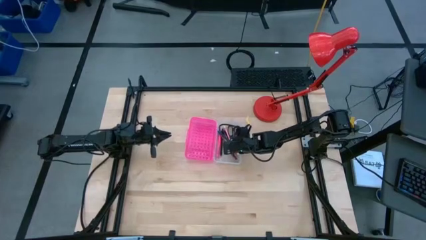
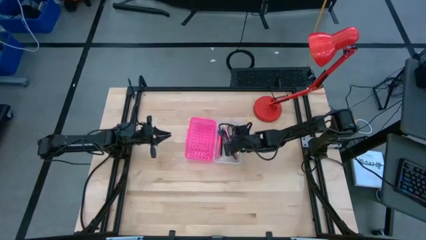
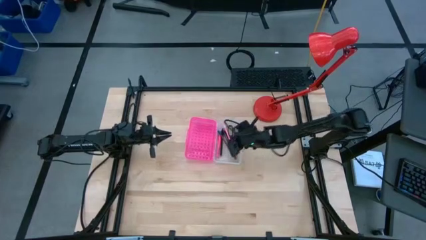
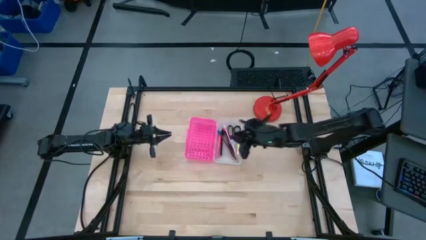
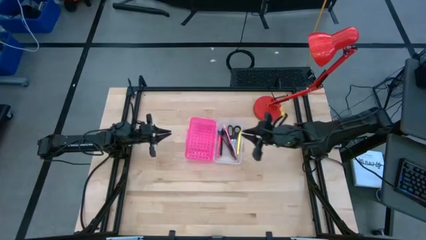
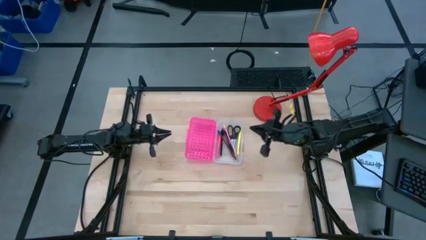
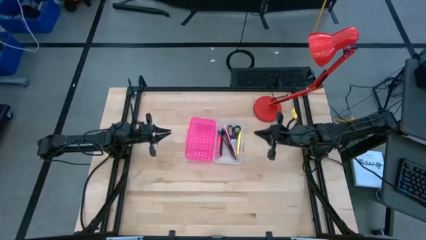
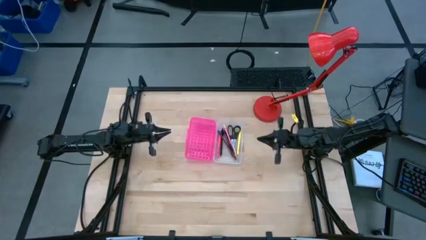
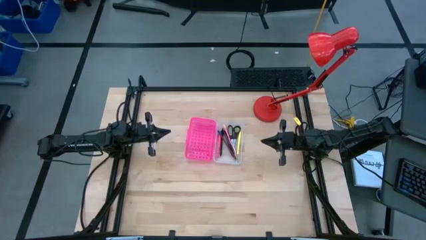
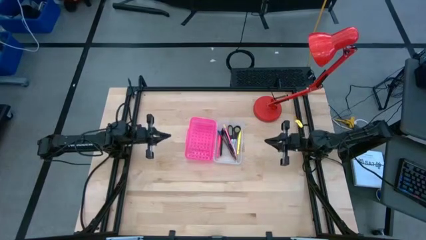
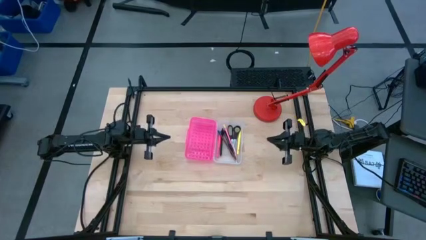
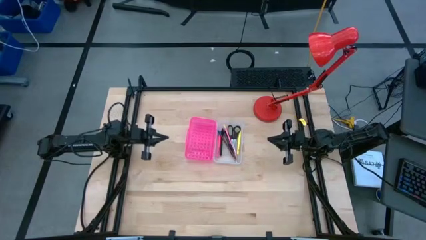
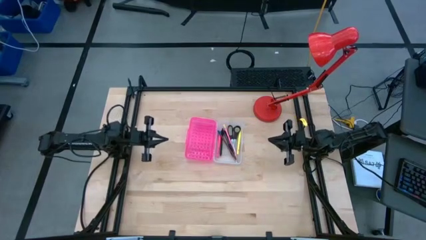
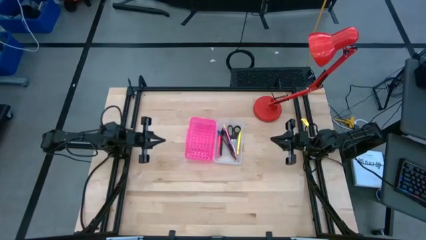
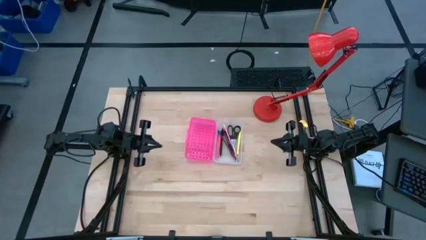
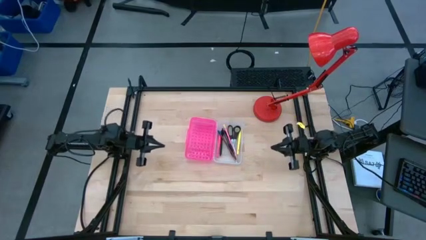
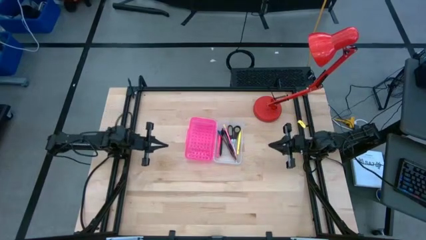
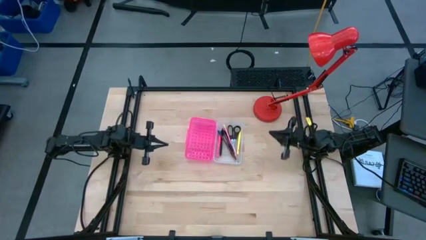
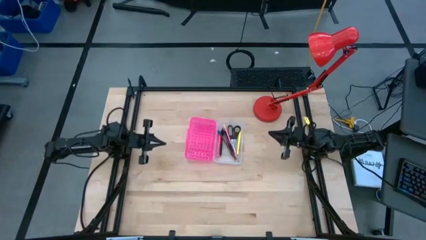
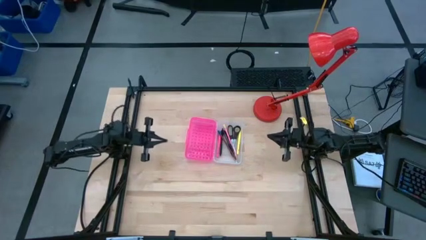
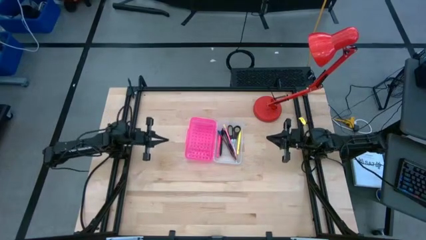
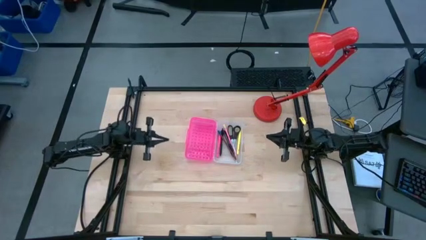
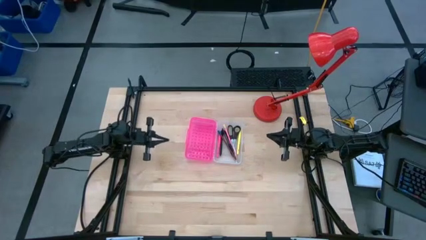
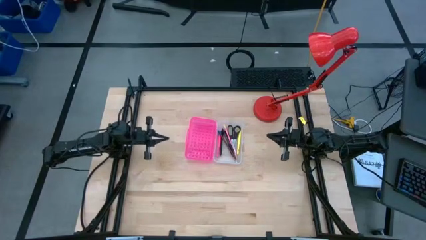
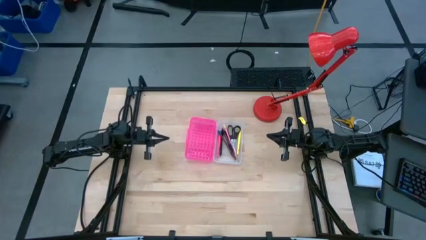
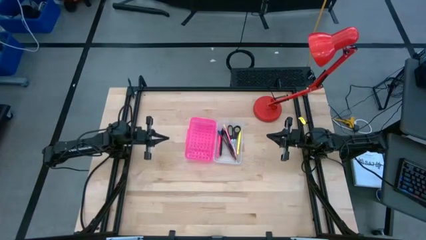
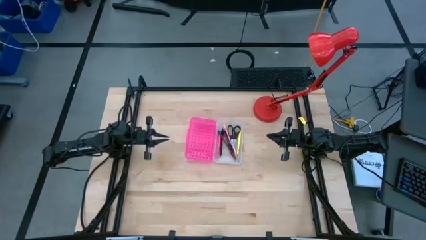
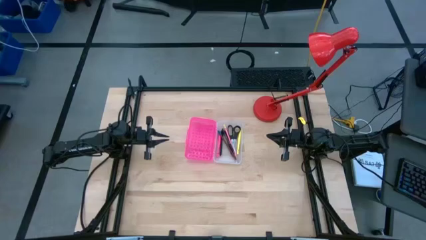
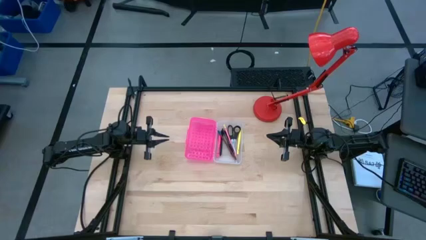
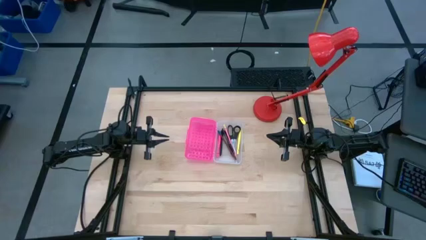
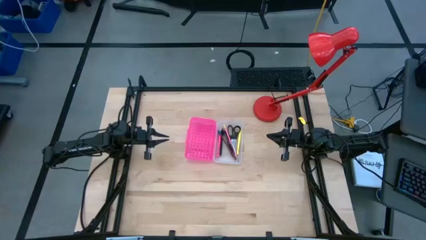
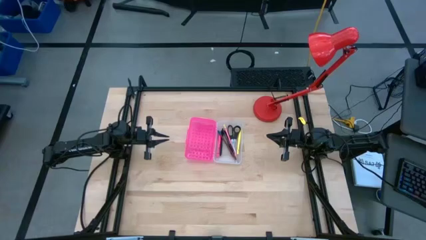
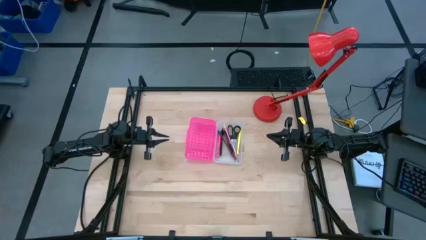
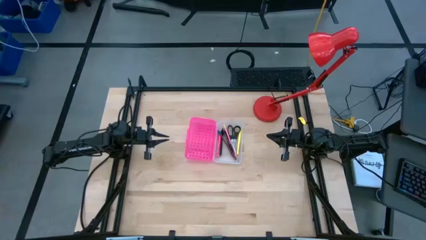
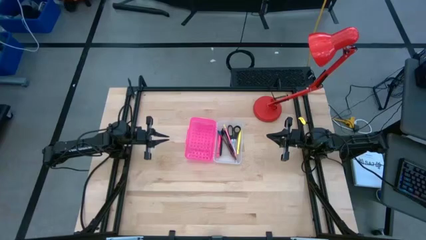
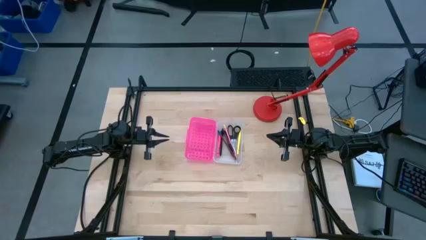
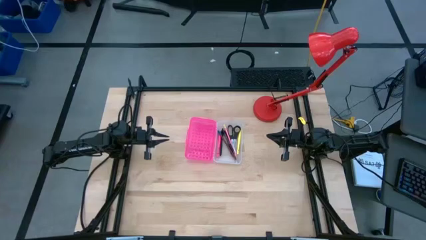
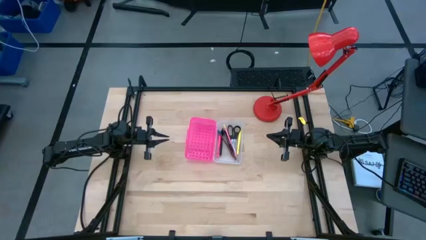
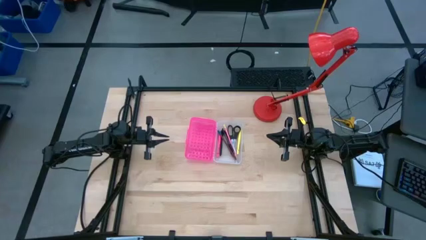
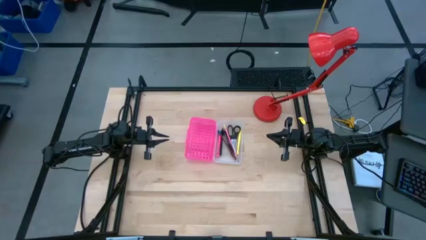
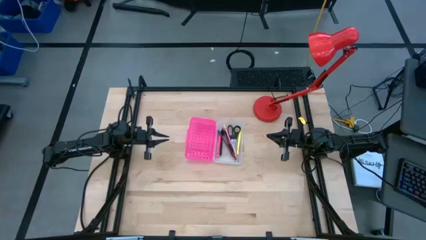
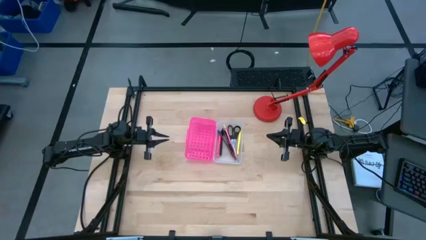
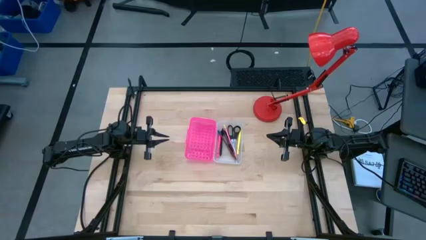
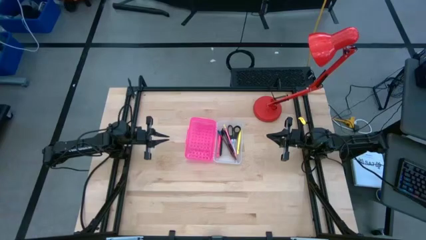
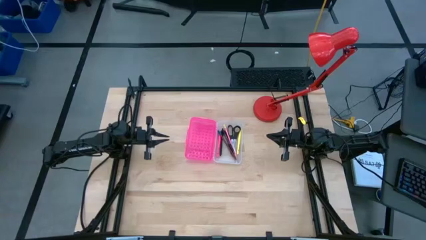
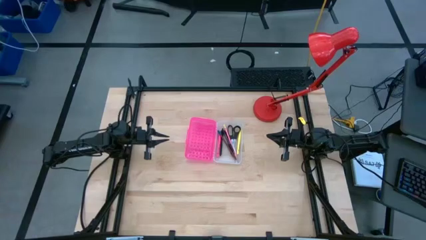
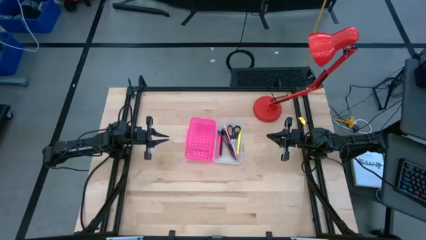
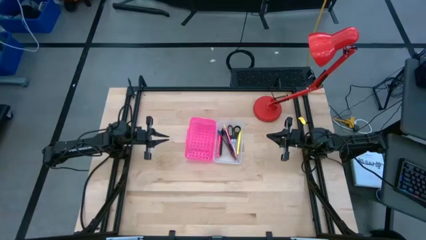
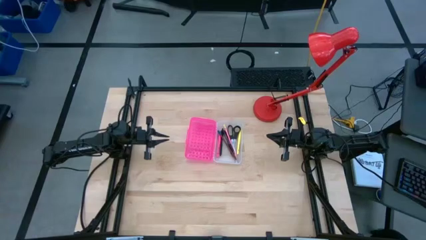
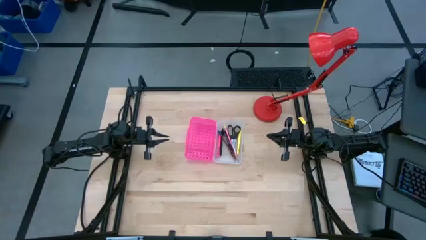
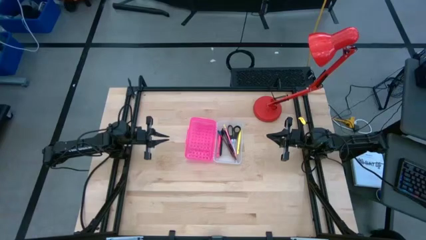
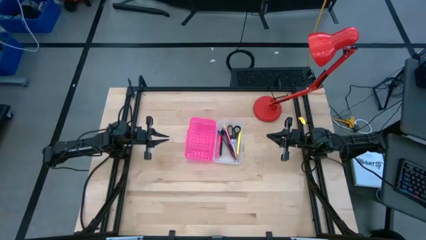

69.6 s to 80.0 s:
Task: Pick & place school supplies into a supply box
Return To Home Position
